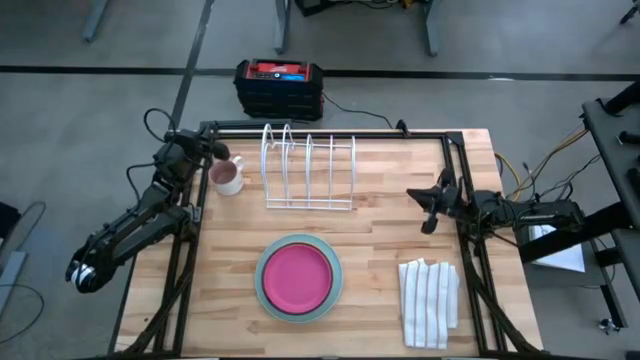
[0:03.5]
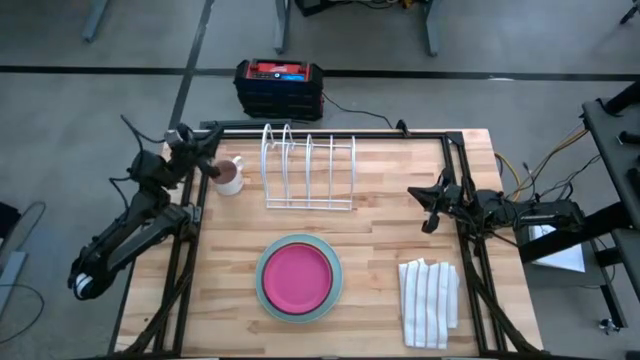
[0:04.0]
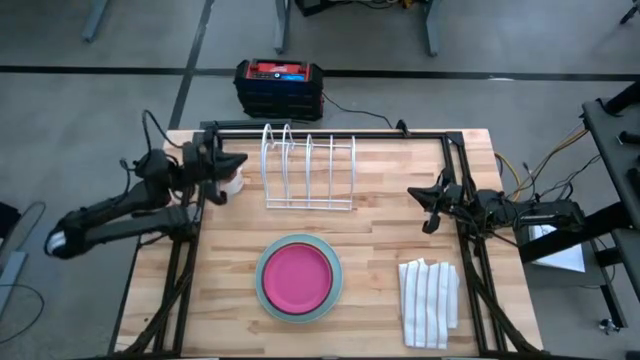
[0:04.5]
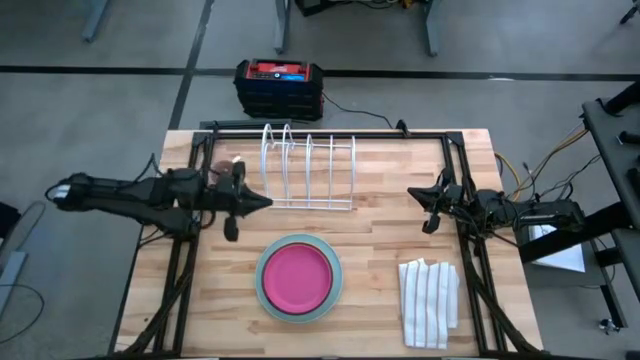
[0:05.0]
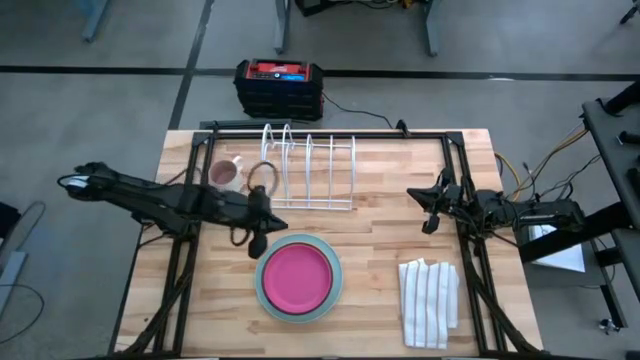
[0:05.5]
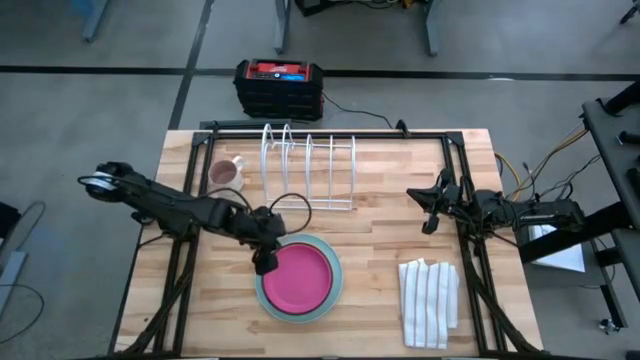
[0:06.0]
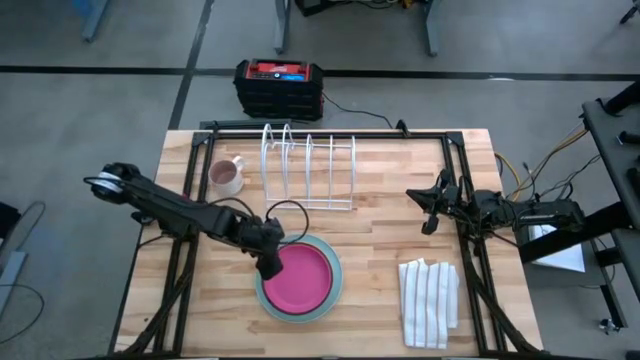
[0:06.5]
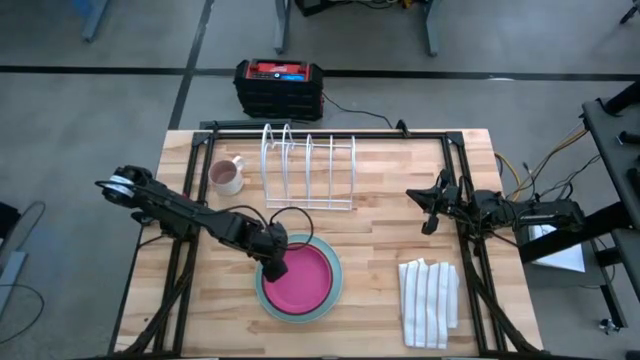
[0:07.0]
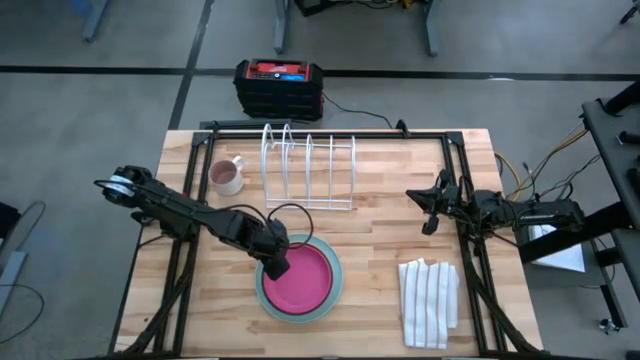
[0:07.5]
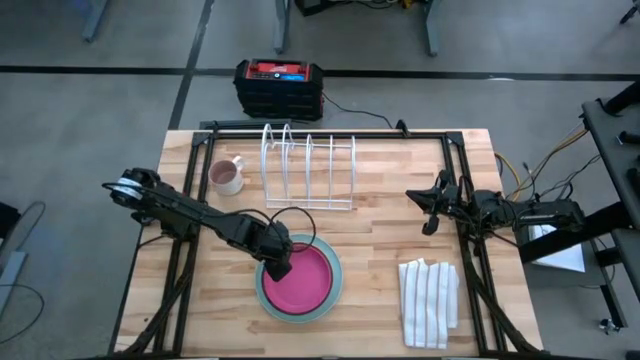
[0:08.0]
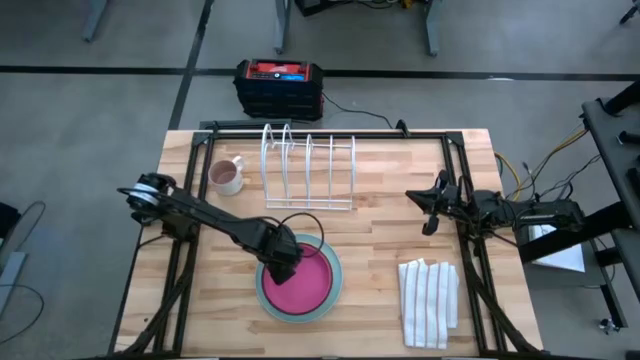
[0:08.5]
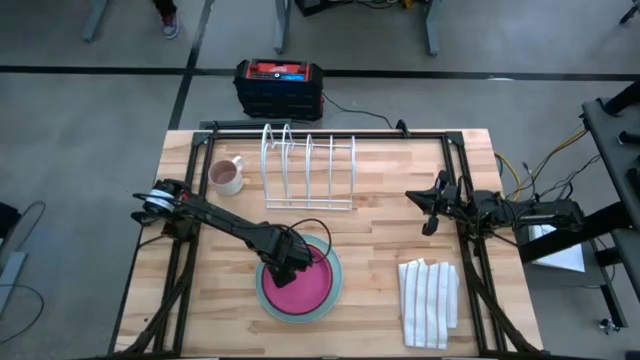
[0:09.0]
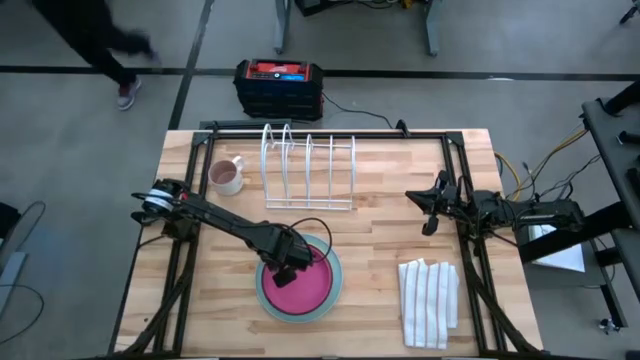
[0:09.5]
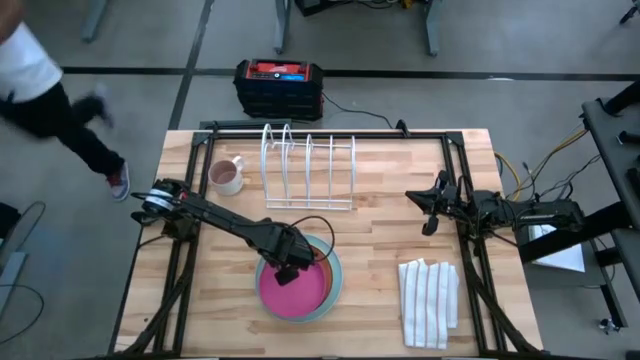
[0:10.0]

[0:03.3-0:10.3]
Task: Sort dishes
Put the pink plate into the dish rack

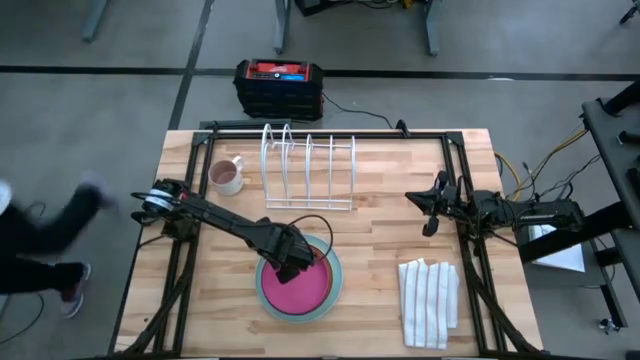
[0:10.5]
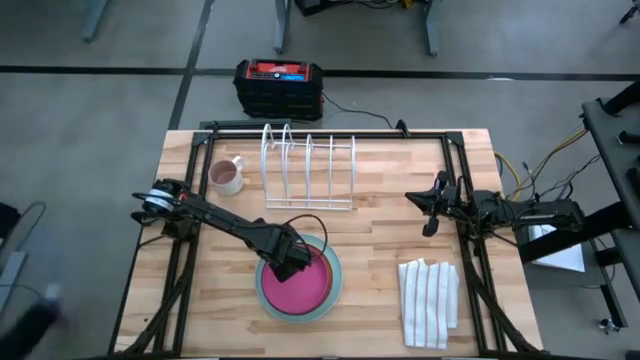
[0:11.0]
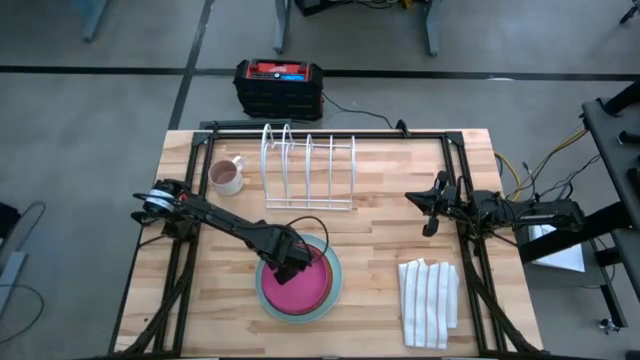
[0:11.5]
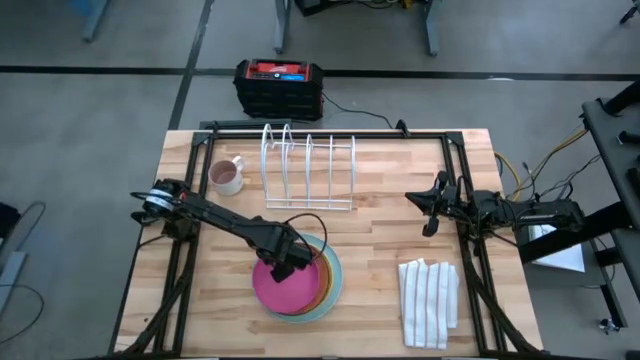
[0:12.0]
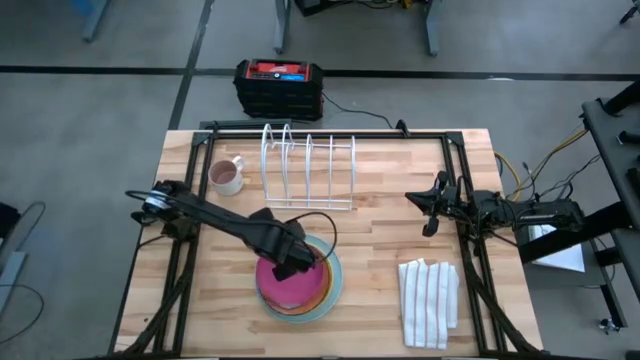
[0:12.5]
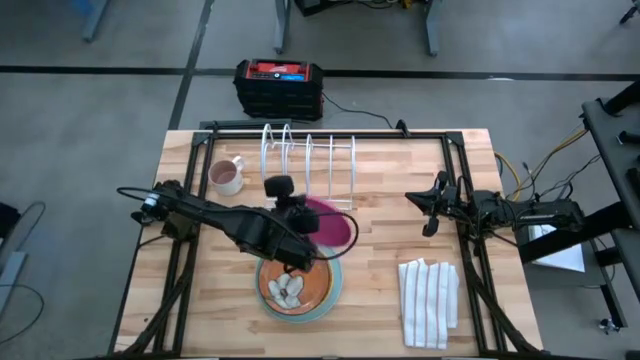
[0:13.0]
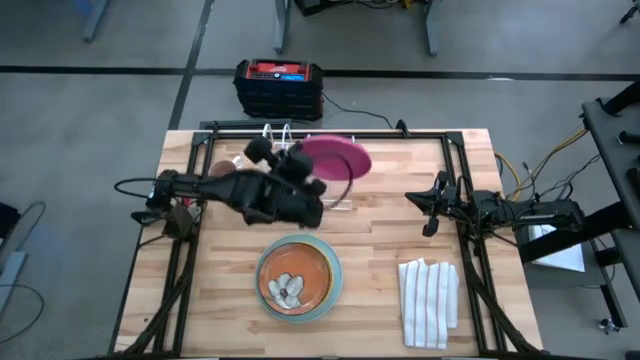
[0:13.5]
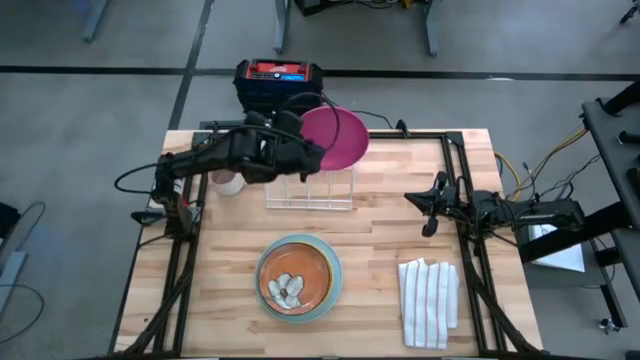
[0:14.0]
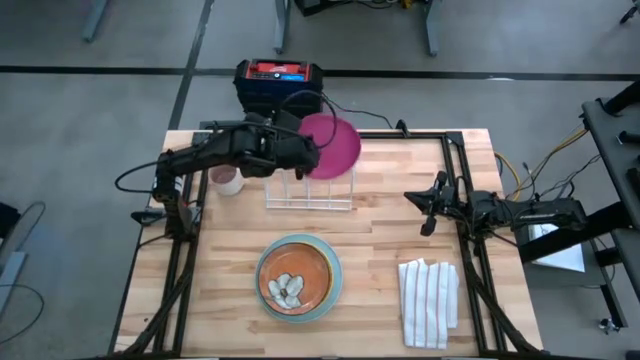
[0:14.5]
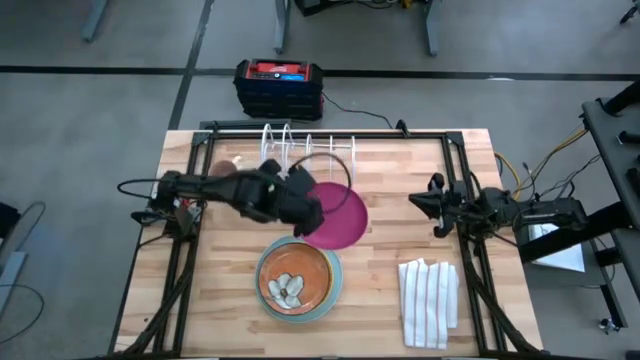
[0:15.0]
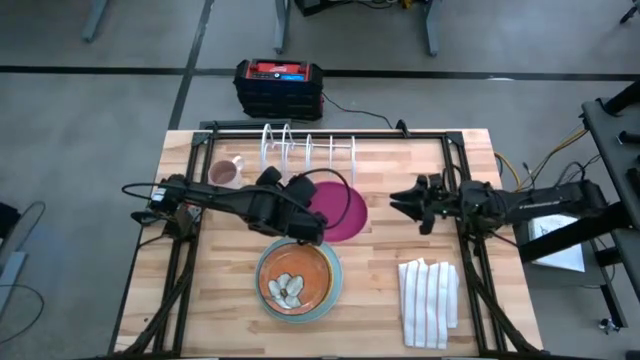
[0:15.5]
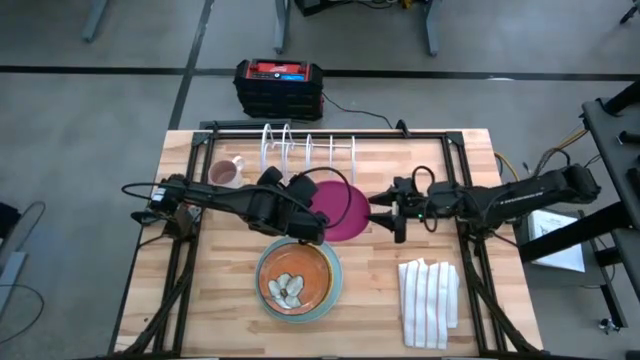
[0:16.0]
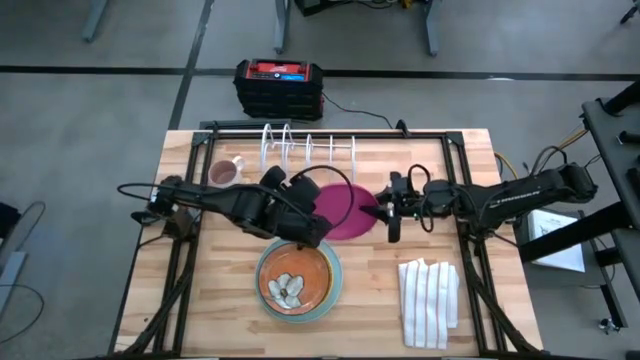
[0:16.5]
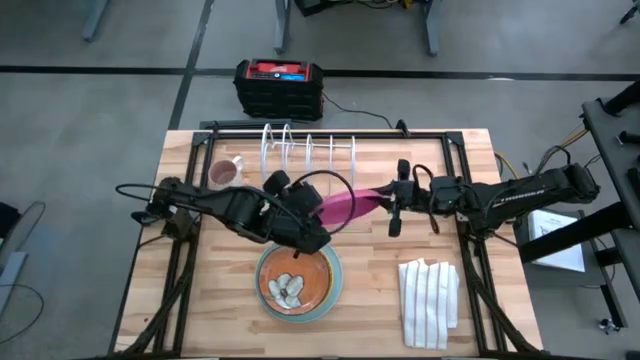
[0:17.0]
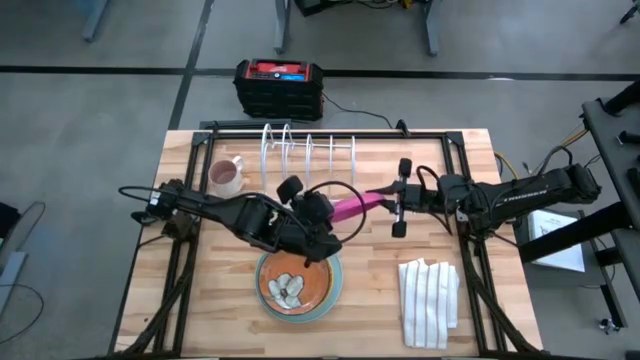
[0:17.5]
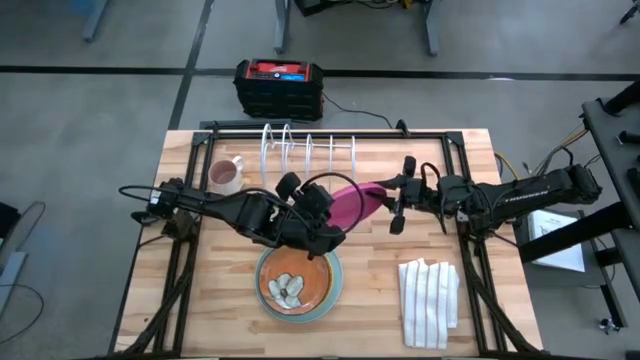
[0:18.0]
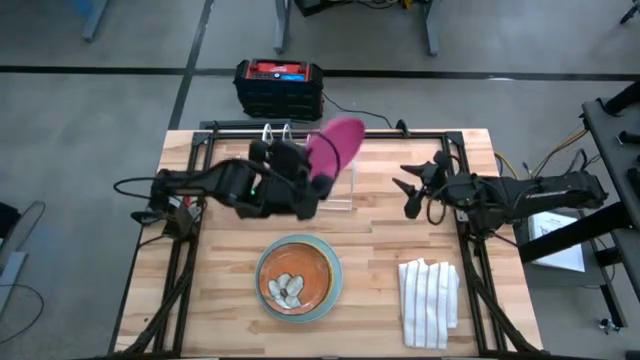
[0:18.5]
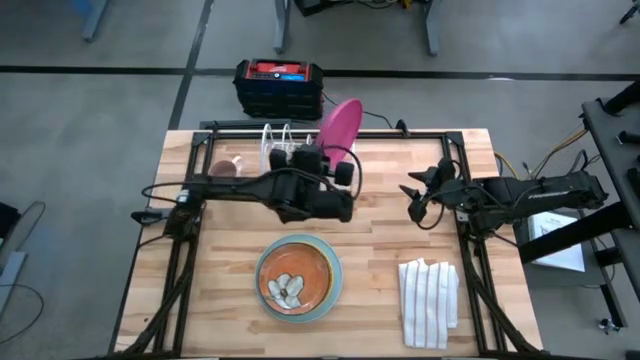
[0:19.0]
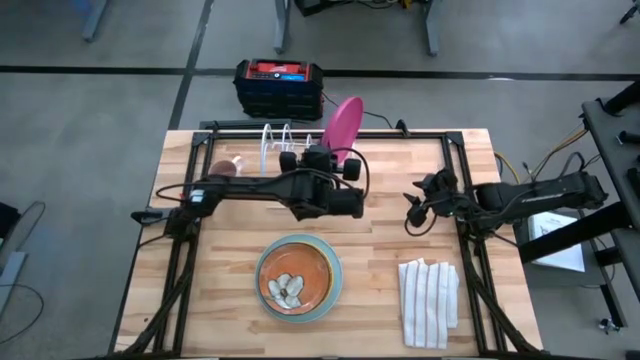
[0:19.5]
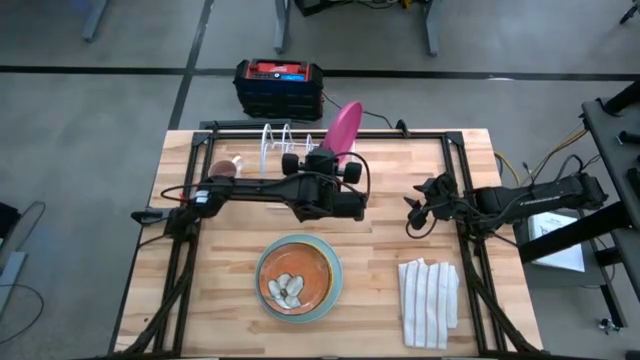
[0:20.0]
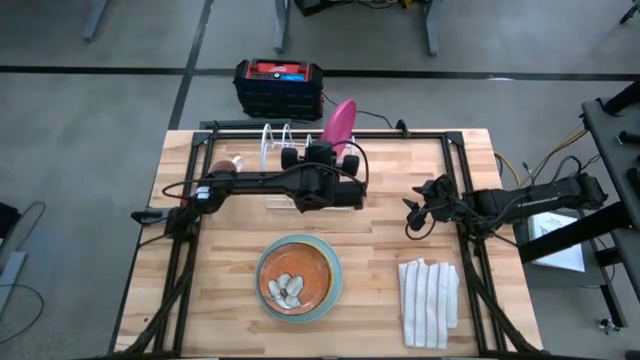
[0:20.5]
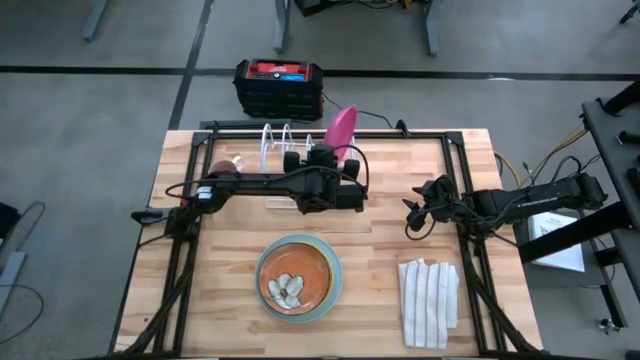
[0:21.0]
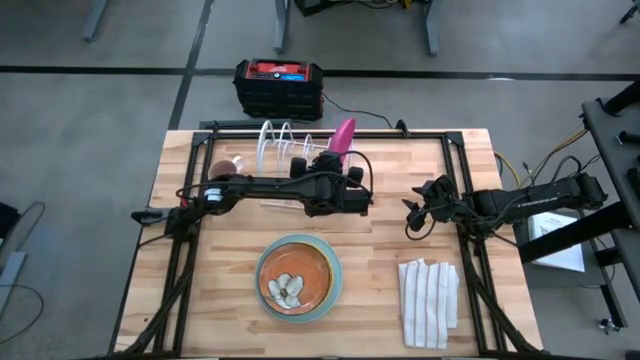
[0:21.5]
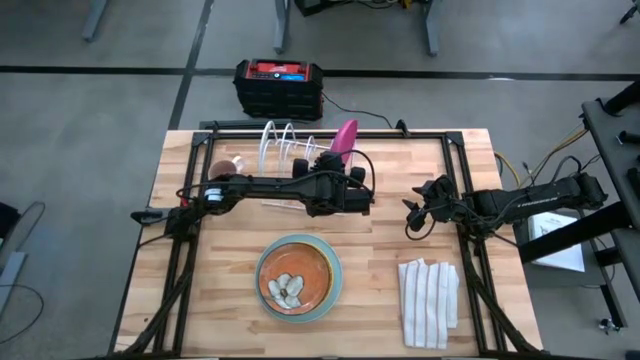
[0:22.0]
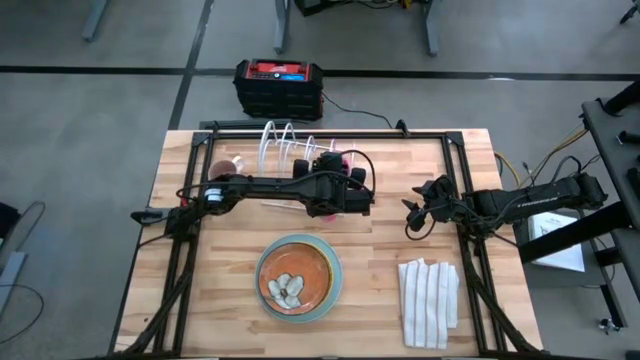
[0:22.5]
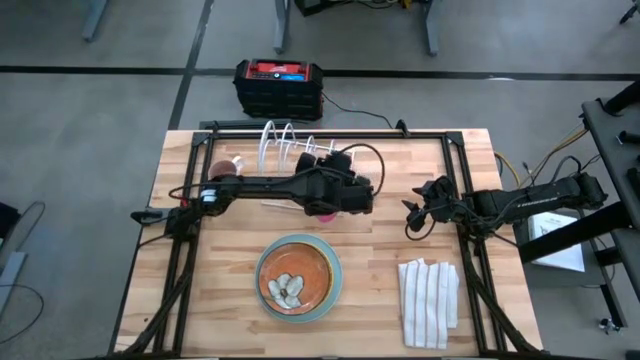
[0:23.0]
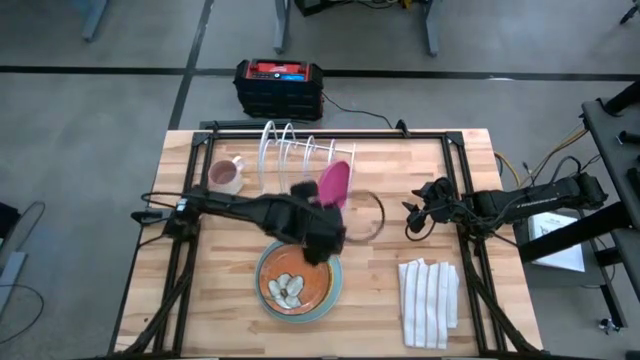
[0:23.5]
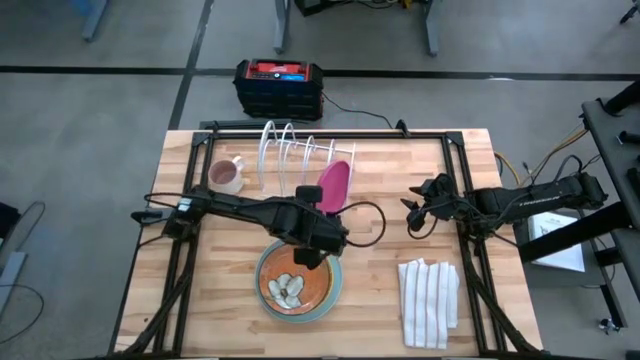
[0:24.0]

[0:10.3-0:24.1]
Put the pink plate into the dish rack
